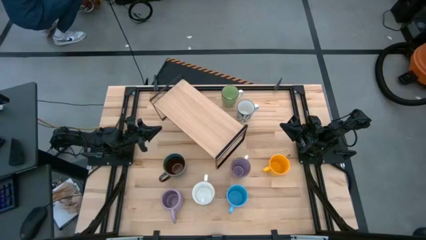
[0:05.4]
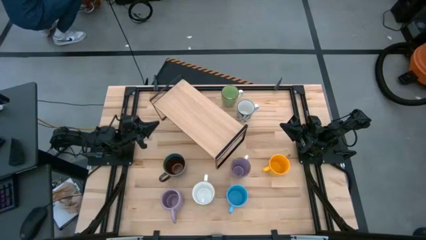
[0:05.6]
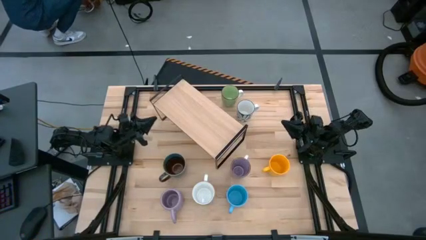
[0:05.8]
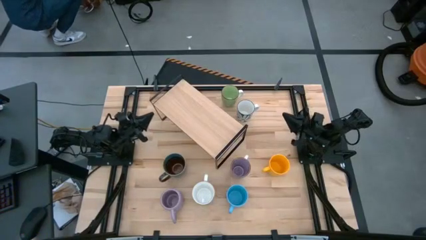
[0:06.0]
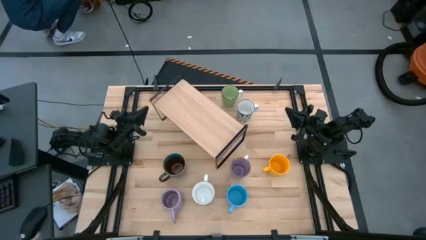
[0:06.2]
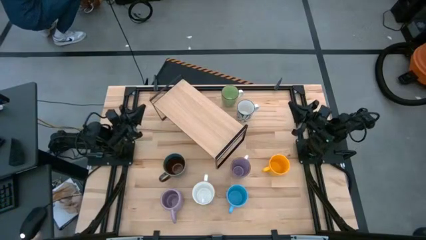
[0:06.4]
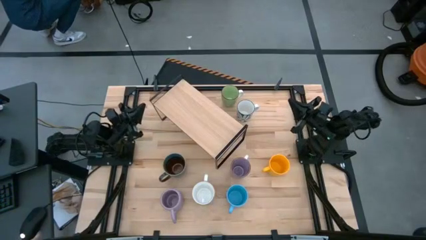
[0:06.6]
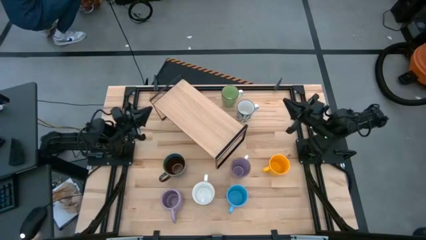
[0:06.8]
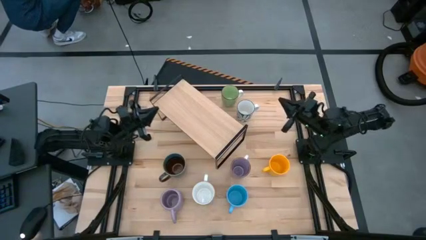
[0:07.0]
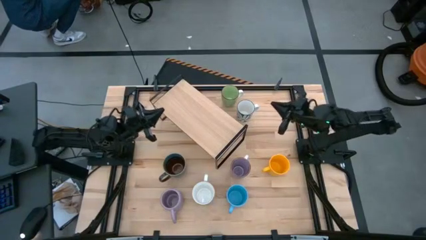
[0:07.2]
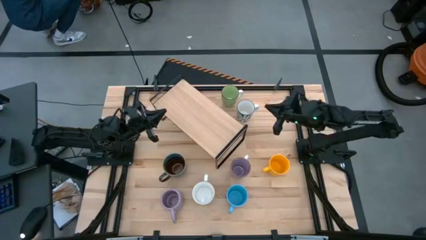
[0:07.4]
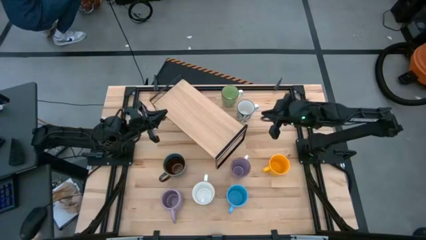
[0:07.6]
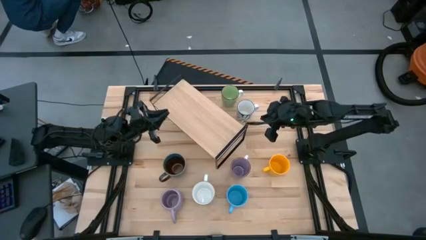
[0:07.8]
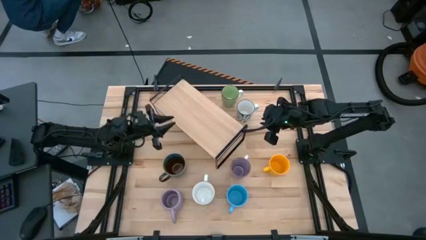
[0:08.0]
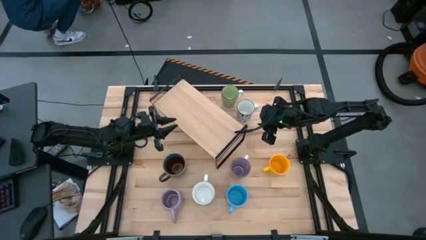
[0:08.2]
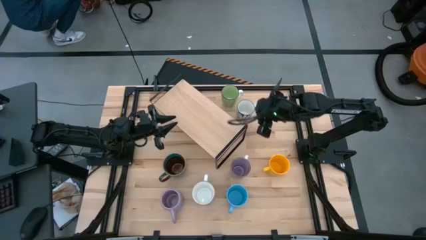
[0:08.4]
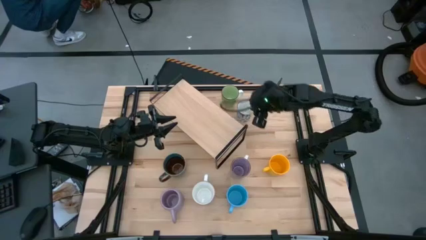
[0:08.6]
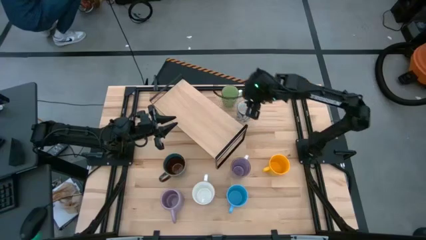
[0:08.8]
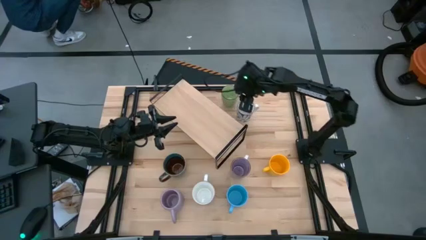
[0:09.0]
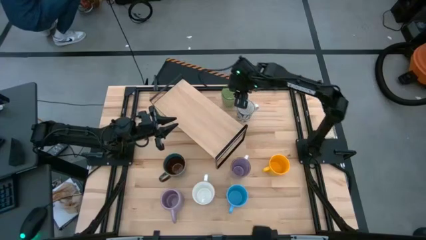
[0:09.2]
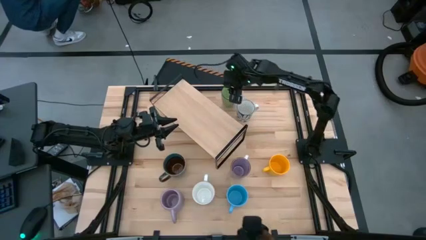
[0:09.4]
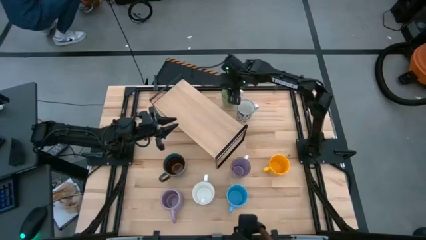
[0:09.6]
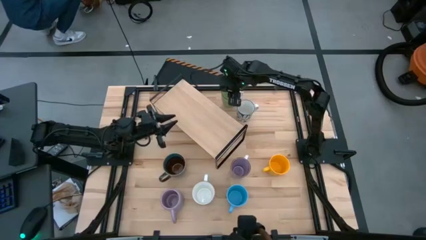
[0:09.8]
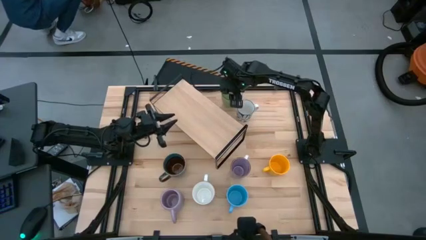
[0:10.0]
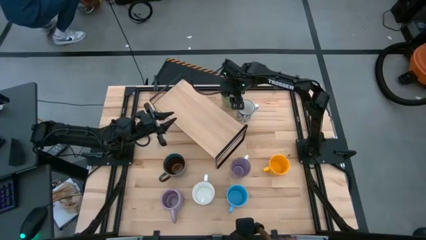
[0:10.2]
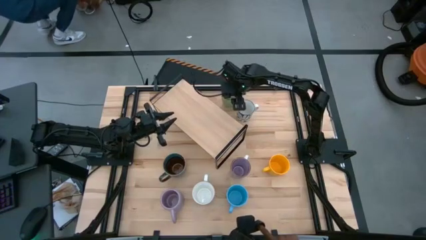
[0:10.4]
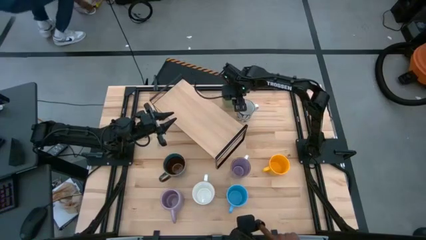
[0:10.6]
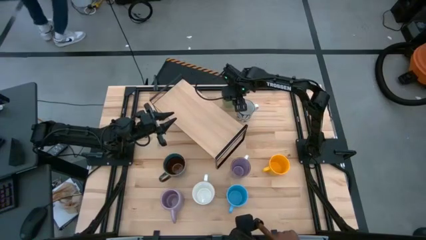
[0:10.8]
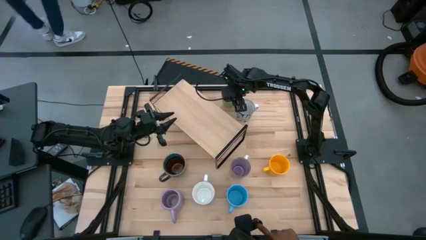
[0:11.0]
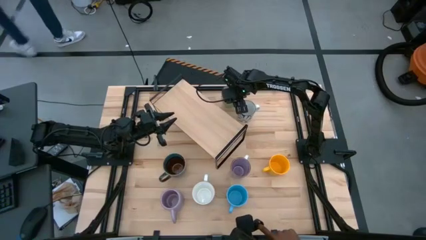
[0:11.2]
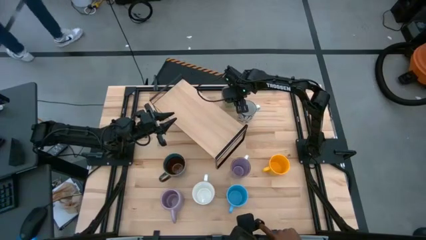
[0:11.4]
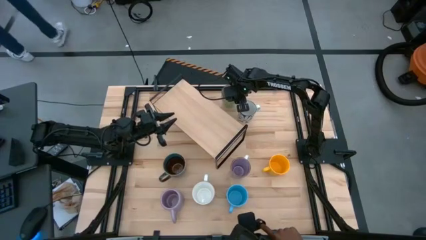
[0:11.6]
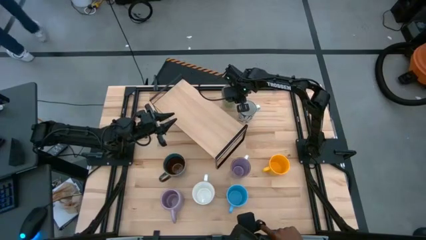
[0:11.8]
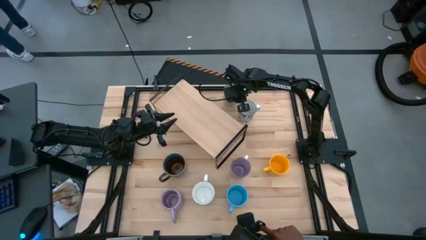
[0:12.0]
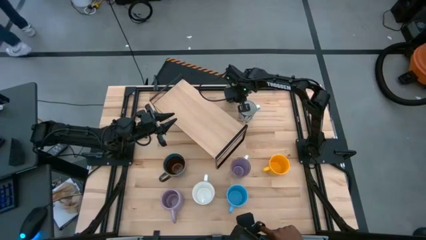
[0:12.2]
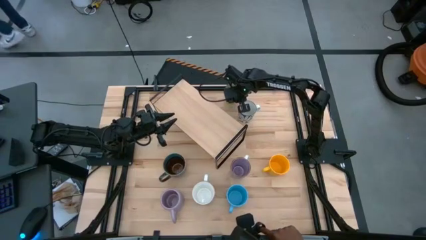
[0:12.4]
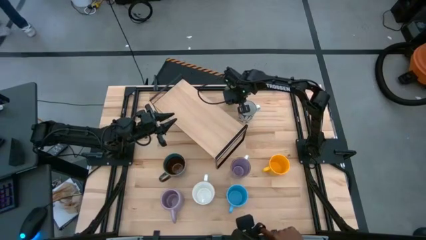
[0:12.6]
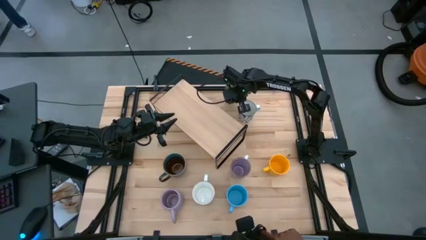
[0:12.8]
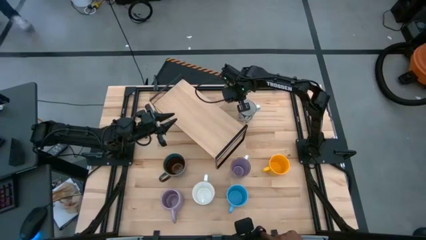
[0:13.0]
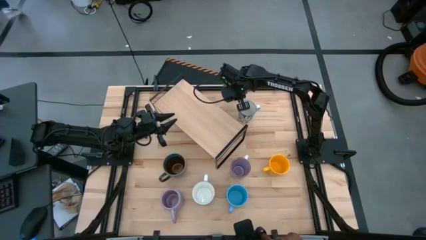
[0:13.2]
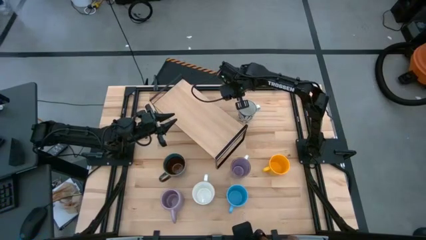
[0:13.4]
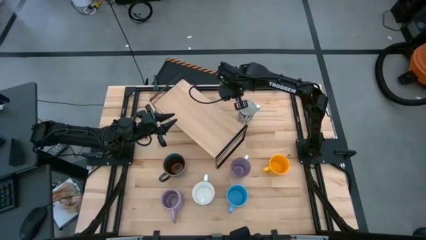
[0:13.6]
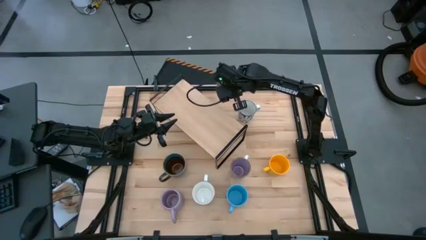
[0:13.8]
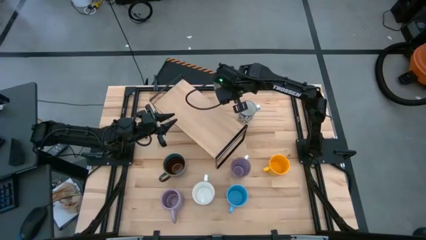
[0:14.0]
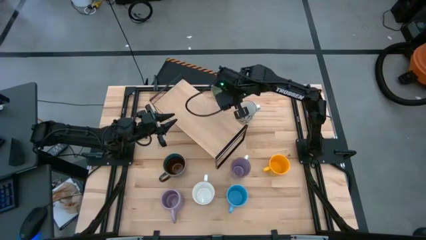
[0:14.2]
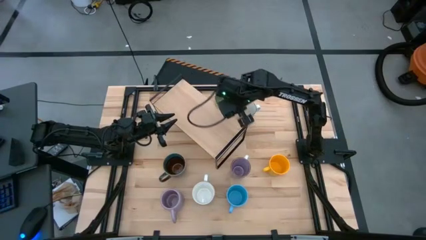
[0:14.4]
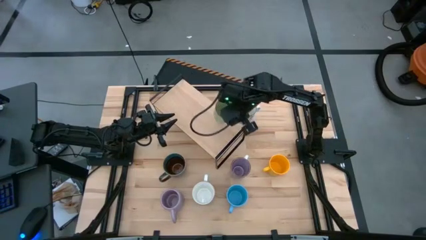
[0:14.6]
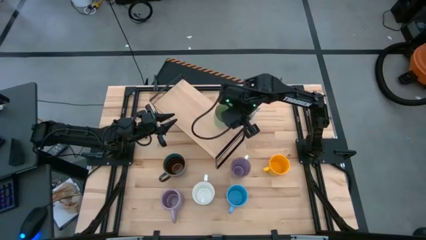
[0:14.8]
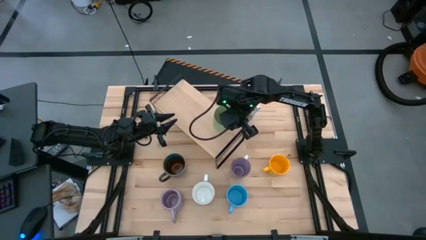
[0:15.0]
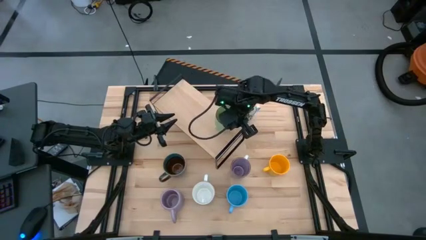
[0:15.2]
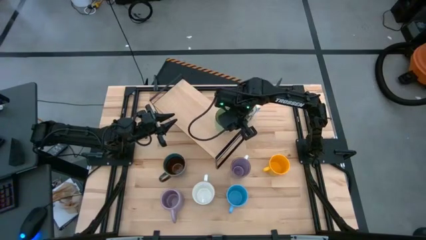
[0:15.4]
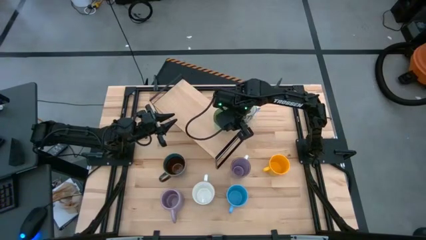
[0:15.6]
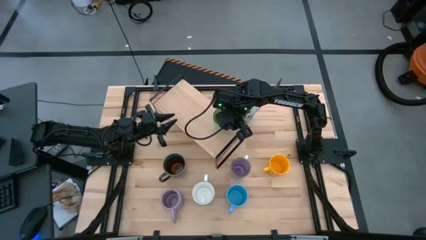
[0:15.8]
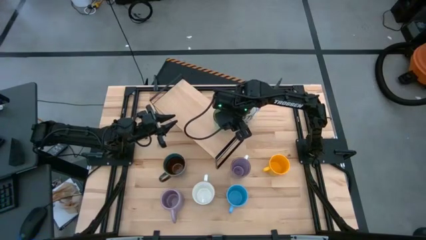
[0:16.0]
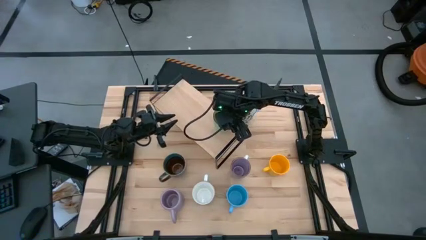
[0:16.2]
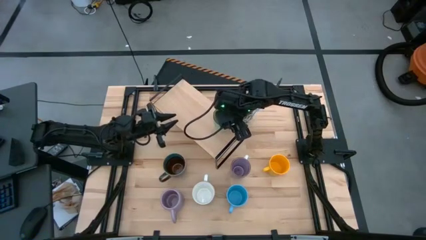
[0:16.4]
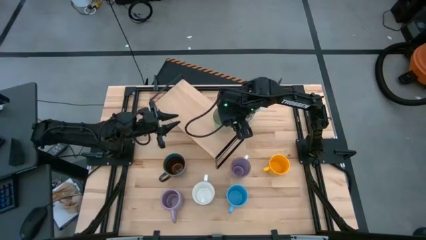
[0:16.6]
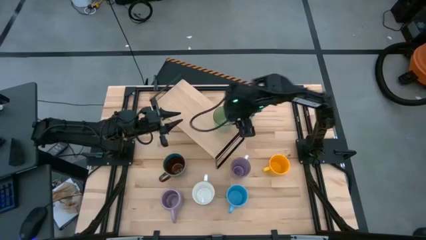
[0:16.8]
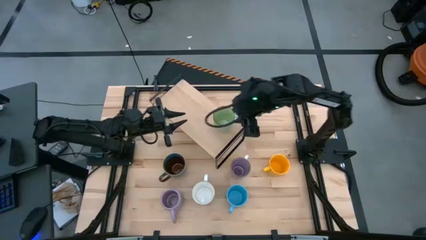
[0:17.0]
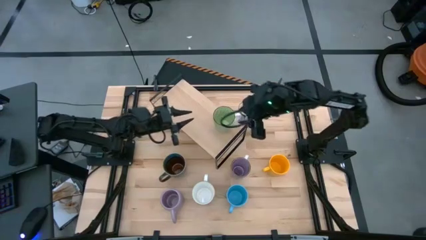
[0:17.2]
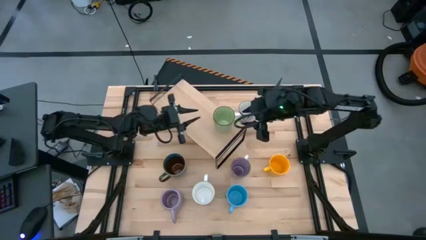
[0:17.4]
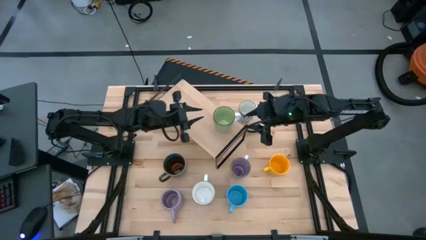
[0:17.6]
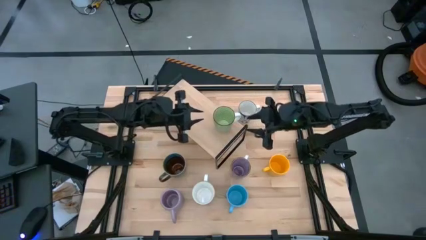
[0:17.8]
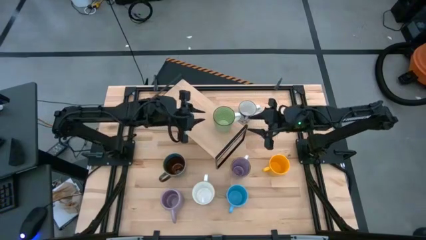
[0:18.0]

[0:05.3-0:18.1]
Task: Place coffee mugs
Put the green patterned mug on the shelf

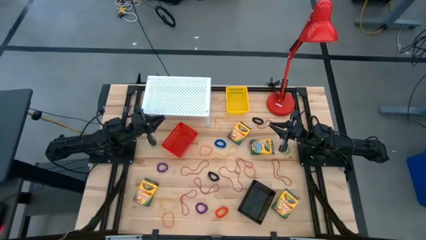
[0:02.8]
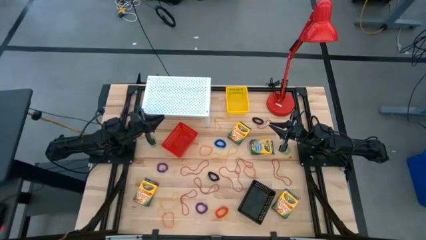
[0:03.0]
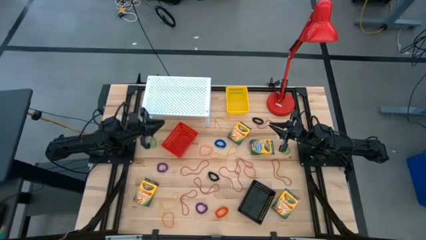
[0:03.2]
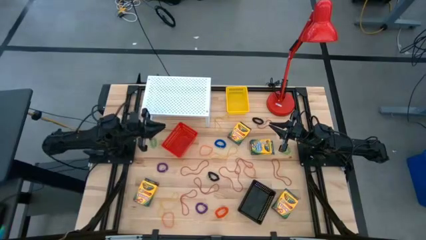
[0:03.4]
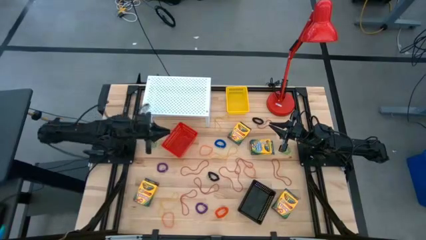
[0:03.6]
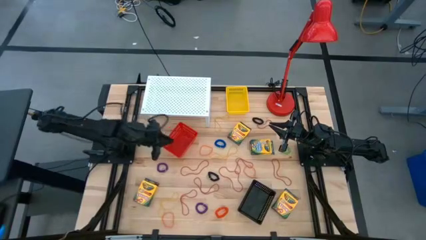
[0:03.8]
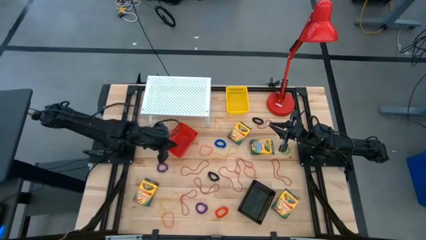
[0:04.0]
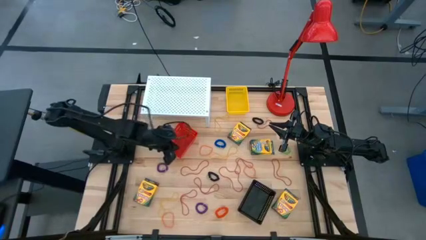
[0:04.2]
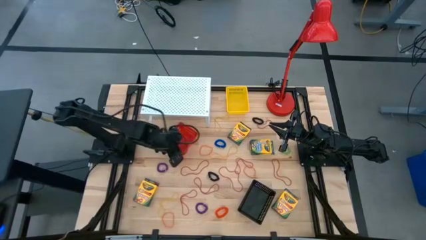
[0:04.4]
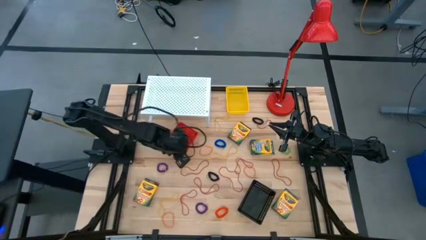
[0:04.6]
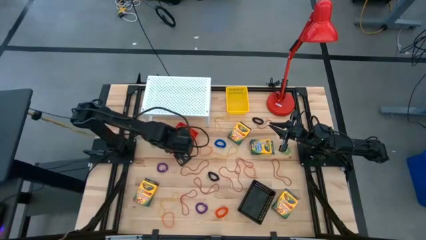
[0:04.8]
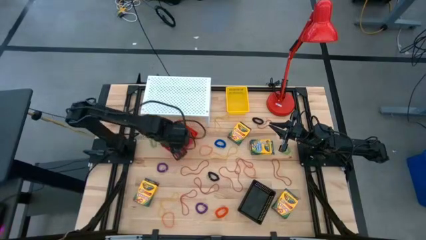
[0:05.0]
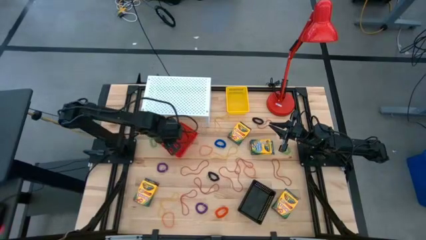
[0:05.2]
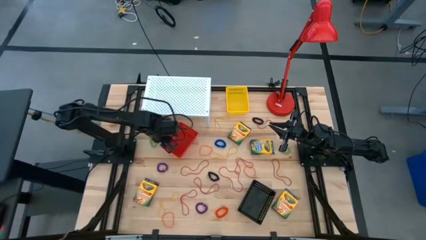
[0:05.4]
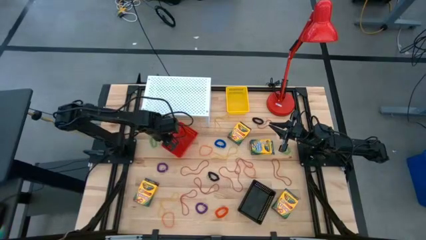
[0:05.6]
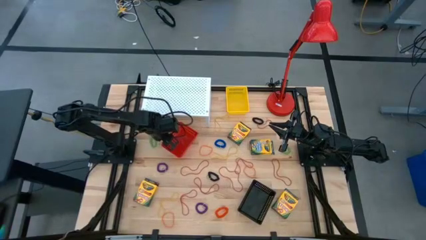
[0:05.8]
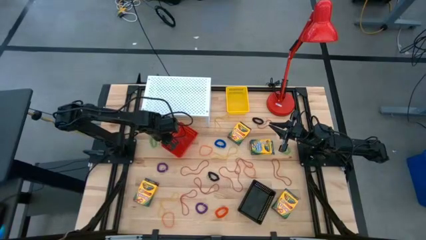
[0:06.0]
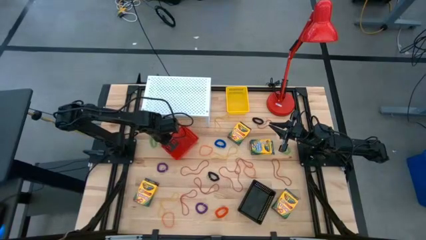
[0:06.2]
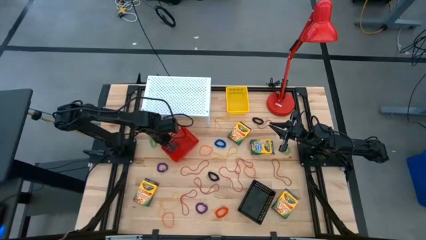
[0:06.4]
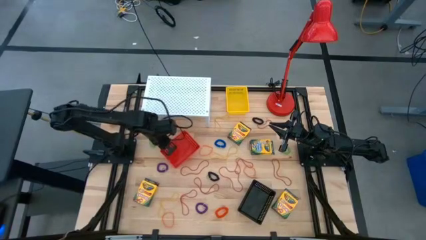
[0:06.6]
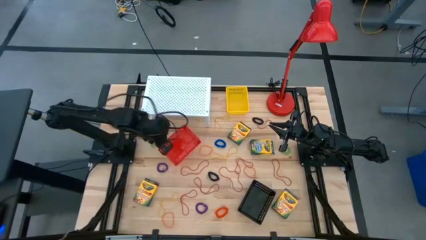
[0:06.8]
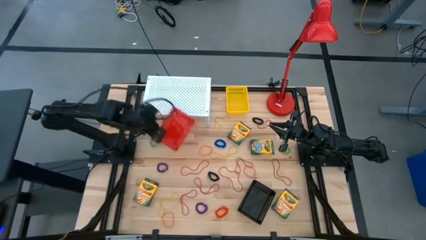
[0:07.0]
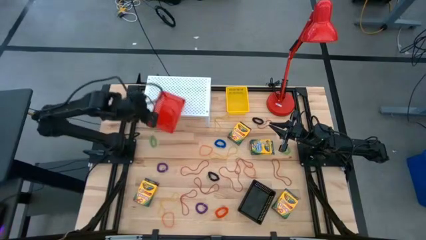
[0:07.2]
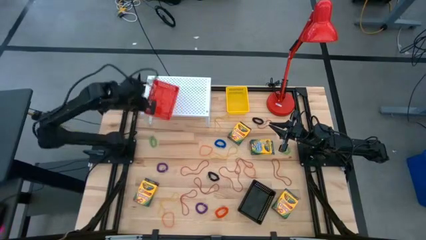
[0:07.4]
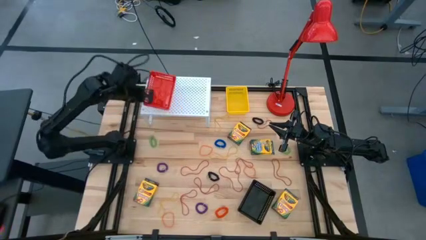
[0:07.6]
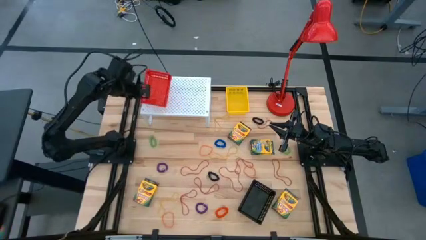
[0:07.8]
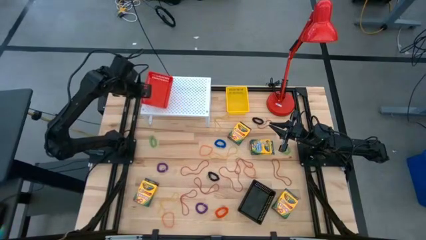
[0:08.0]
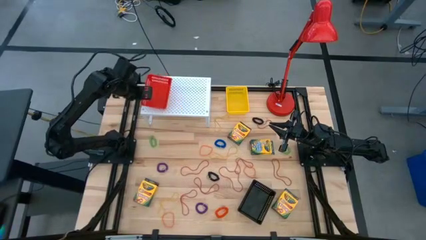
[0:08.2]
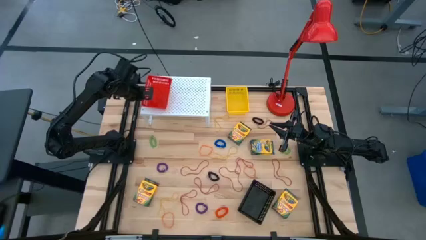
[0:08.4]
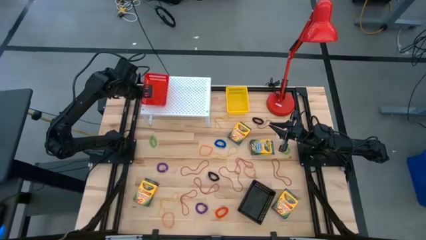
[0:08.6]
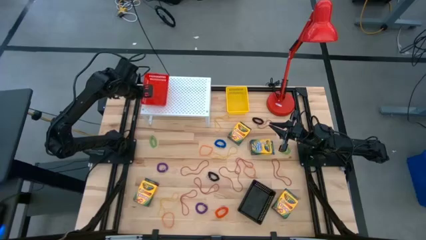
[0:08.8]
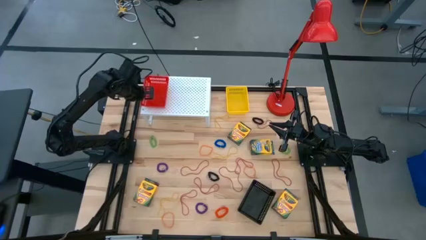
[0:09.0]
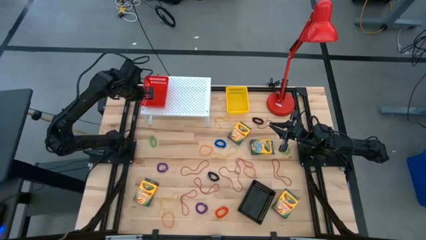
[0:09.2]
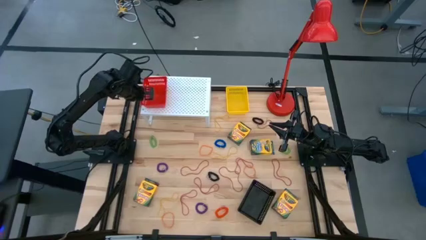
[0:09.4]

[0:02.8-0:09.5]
Task: Pick & Place Office Desk Supplies
Put the red bin on the shelf
